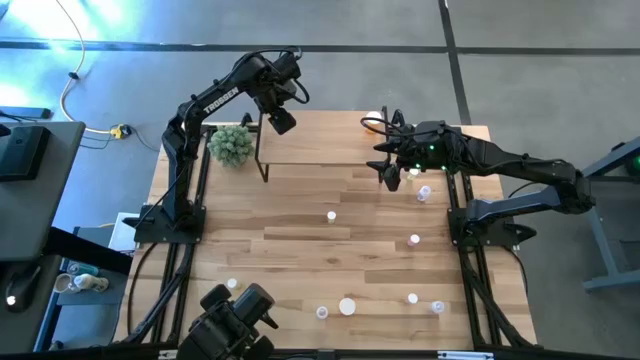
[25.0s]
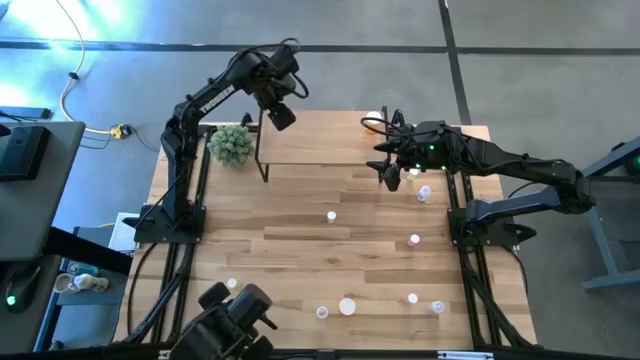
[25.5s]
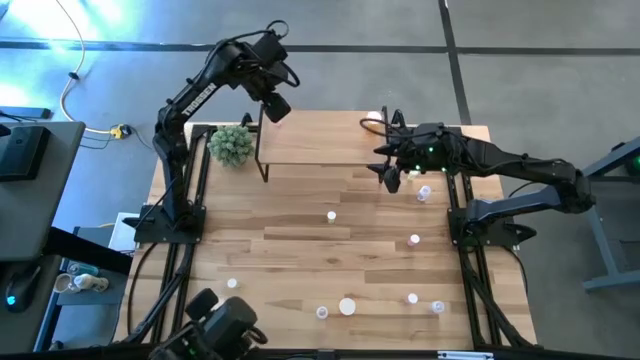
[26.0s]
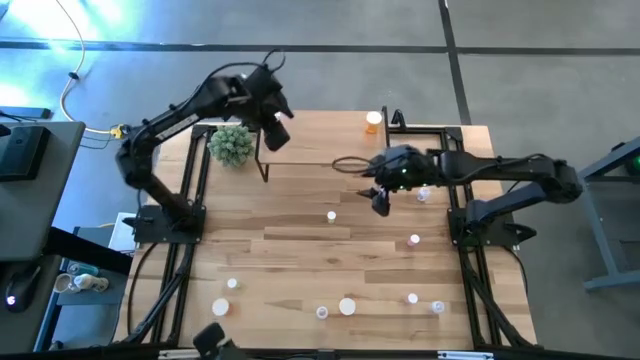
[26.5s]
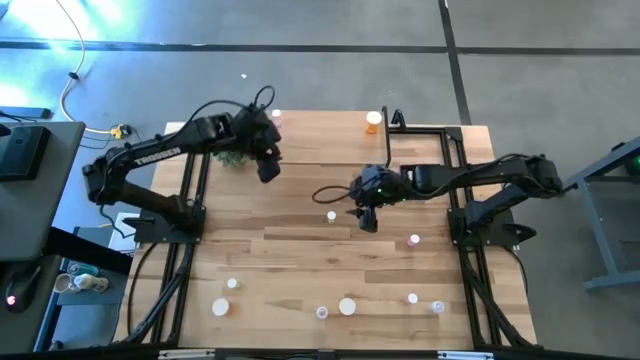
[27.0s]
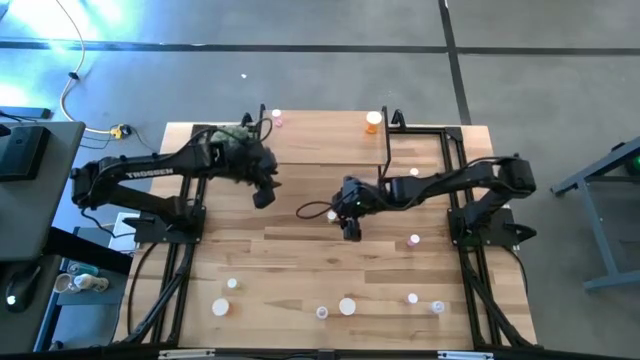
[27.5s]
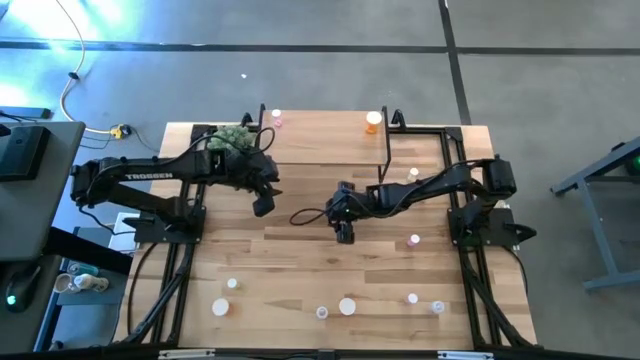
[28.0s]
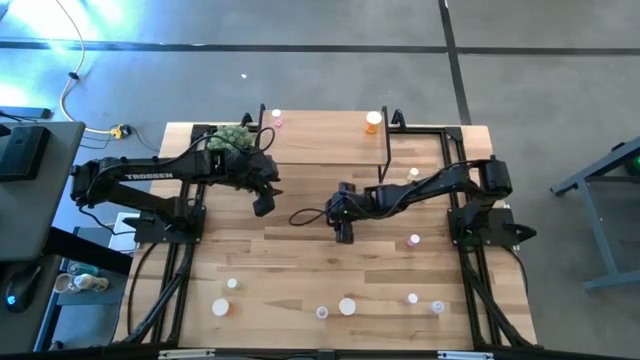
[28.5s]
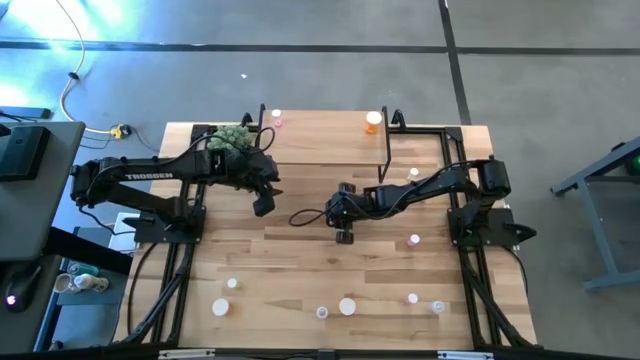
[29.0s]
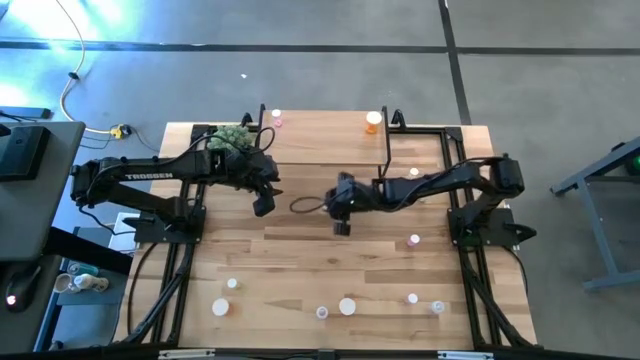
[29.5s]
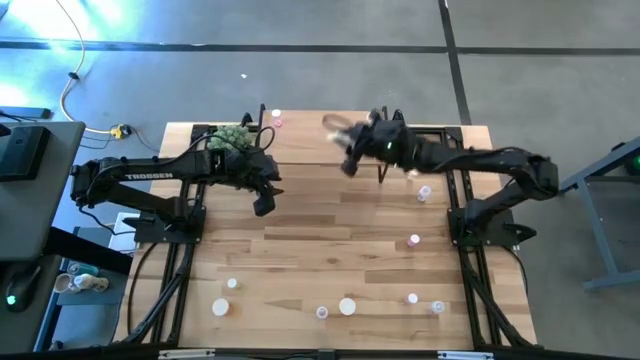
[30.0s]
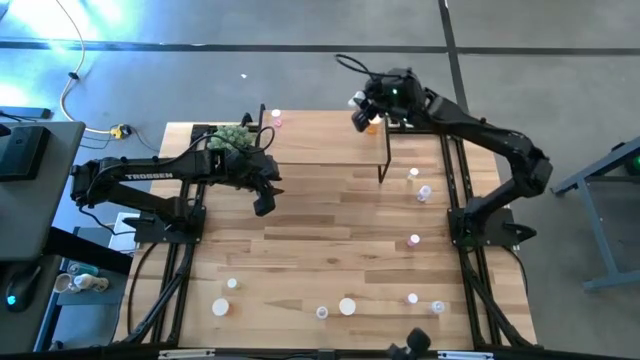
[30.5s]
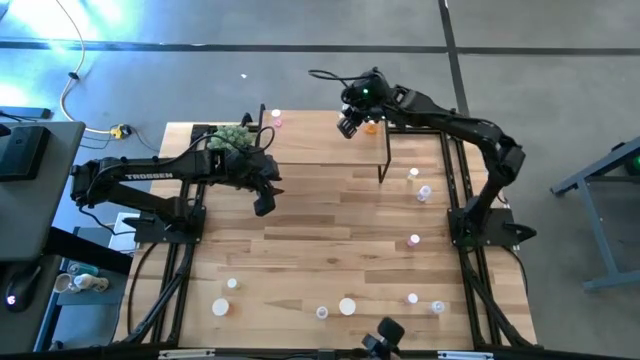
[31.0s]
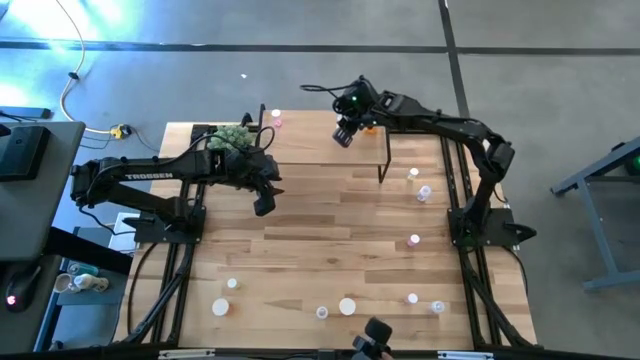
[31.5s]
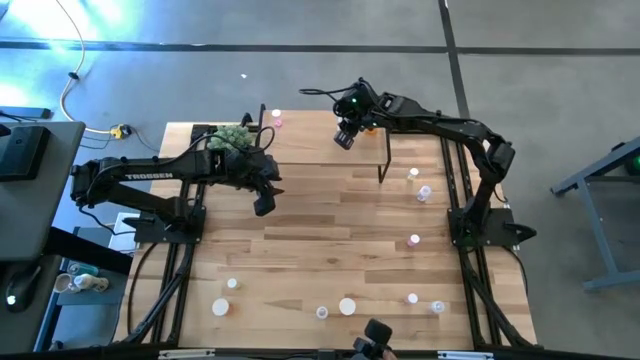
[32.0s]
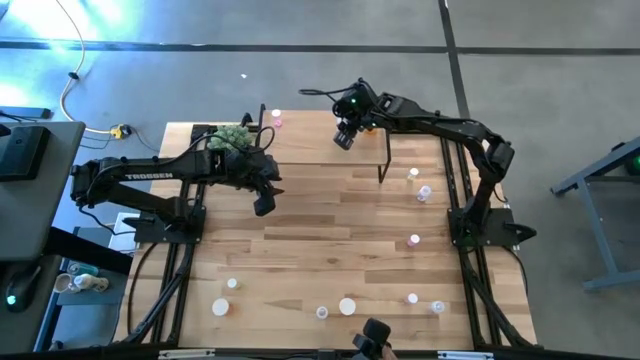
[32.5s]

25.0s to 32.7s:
Task: Pick and place medicine bottles onto shelf by color
Put the middle yellow pill bottle on the shelf

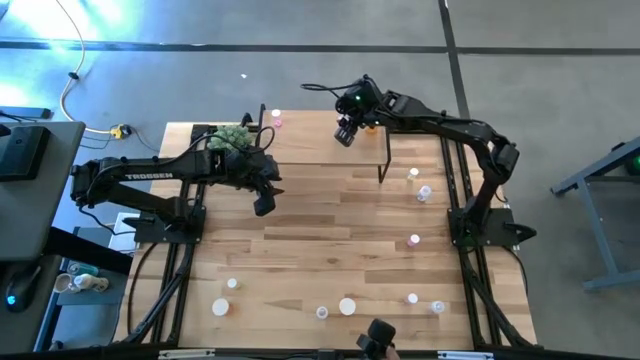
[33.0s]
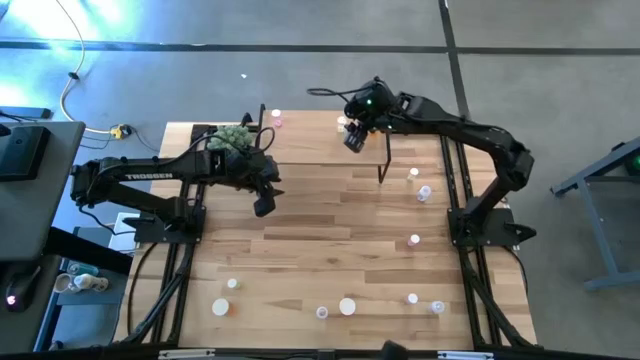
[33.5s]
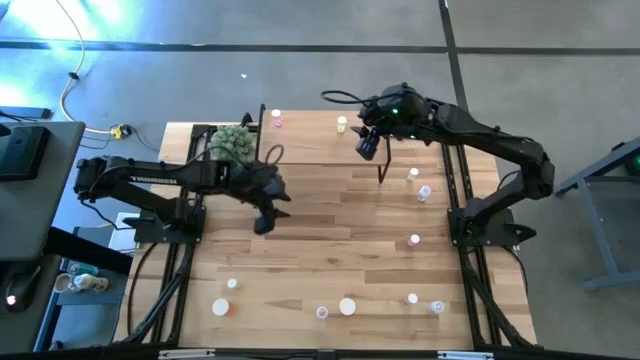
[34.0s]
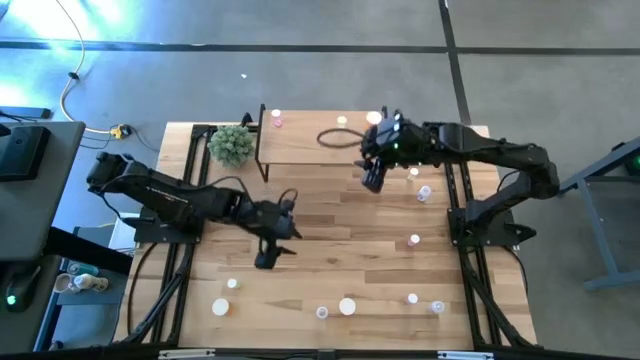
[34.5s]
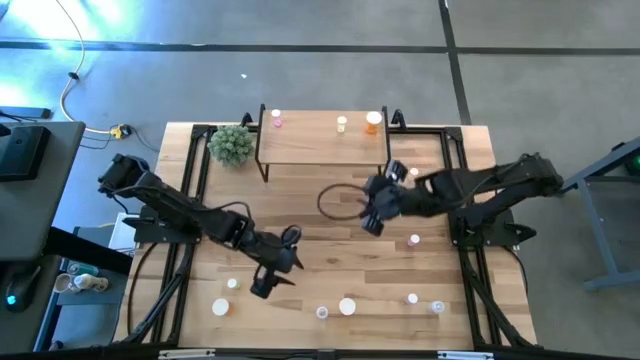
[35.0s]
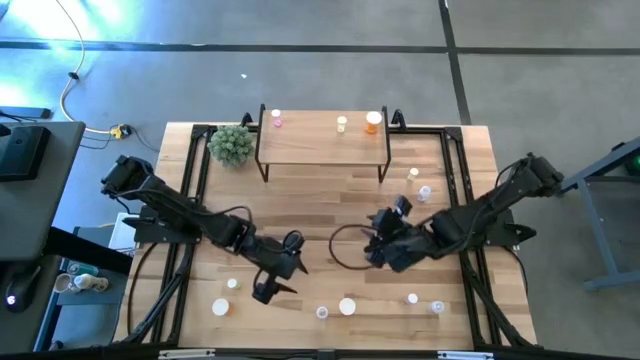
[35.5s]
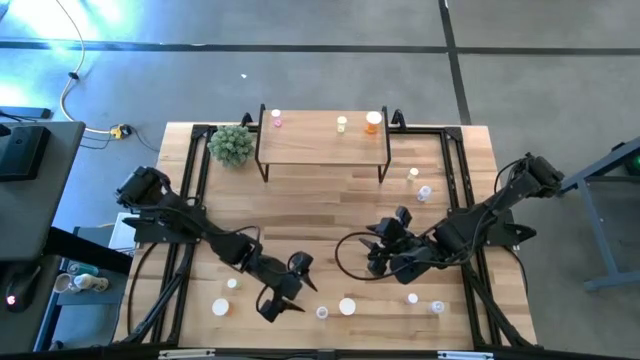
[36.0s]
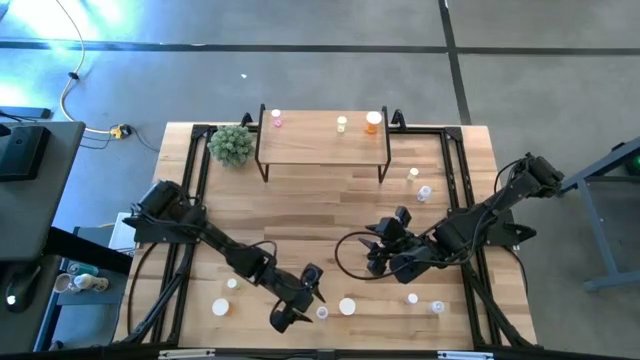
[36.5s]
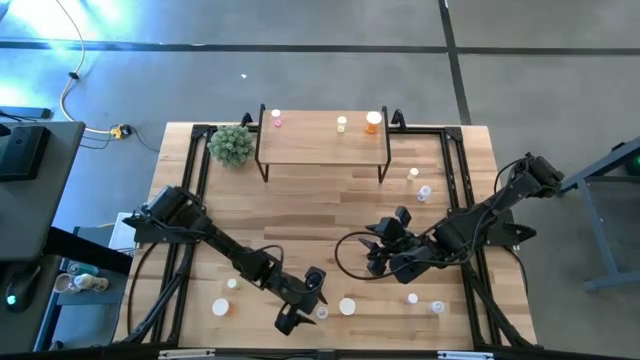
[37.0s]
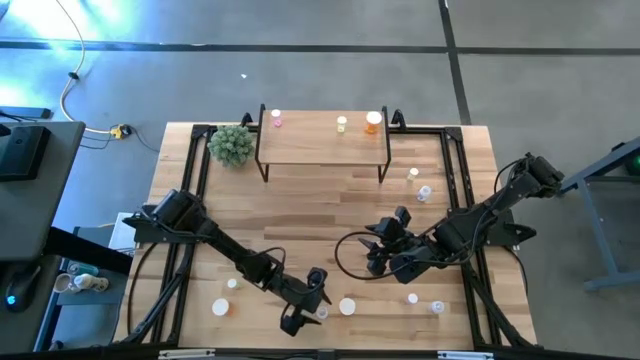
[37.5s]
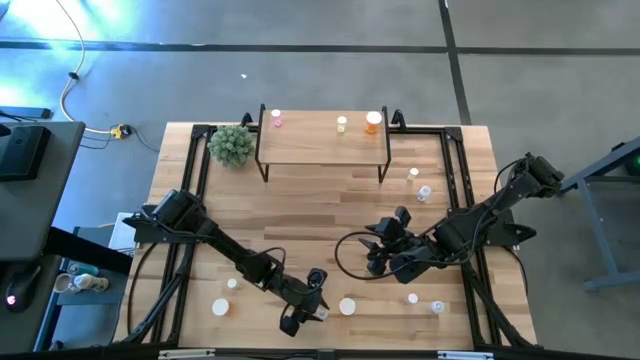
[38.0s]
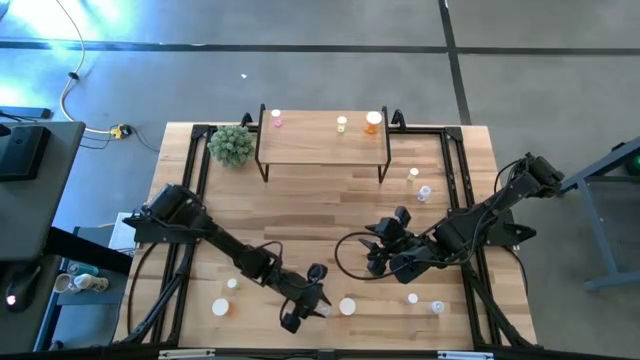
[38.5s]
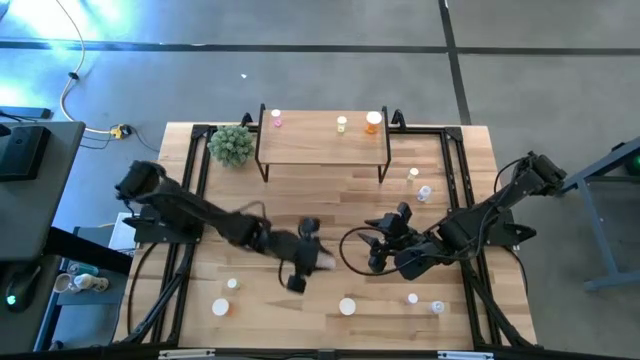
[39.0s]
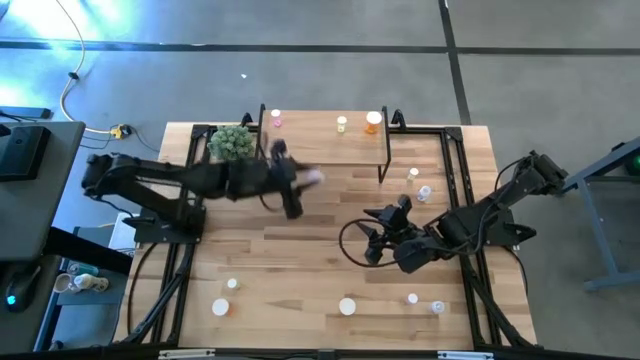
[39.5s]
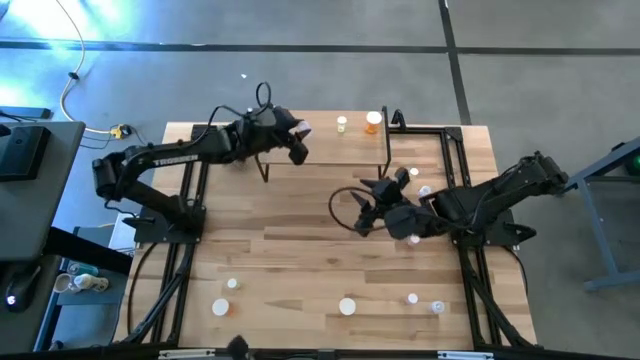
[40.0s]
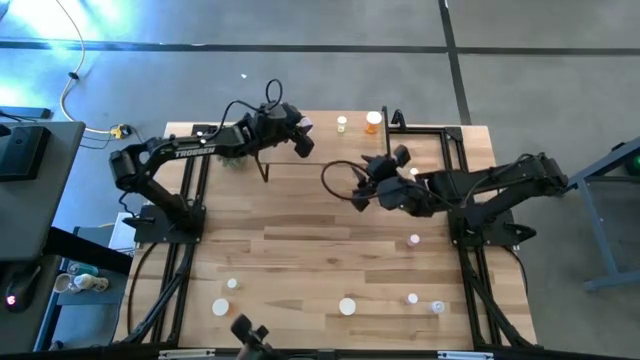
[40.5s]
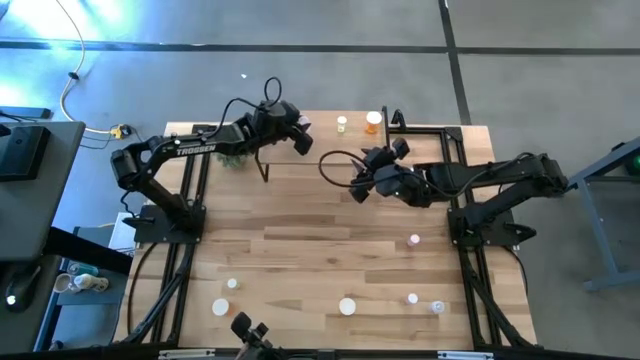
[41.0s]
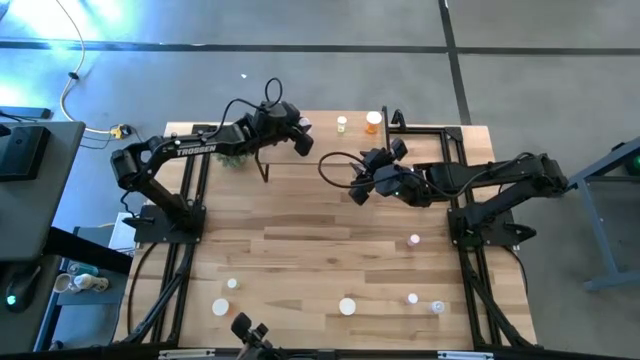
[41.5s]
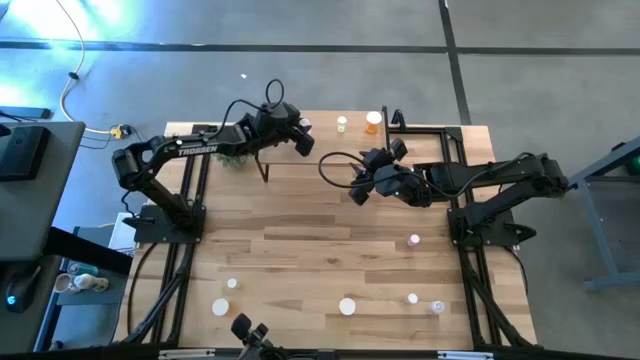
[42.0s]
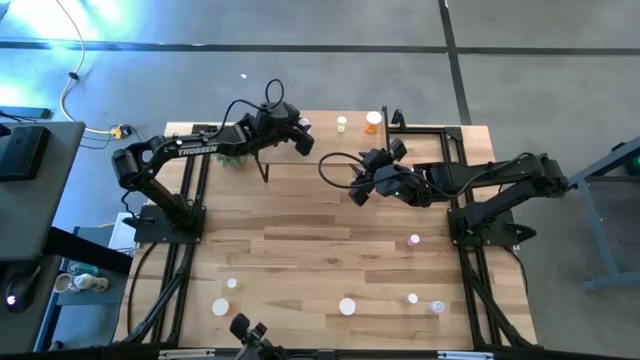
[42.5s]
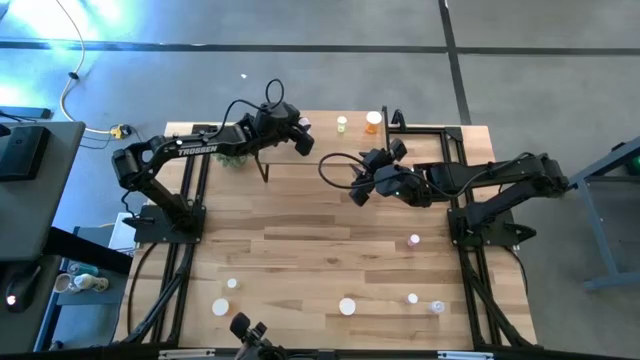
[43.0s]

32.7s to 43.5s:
Put the bottom left transparent pill bottle on the shelf

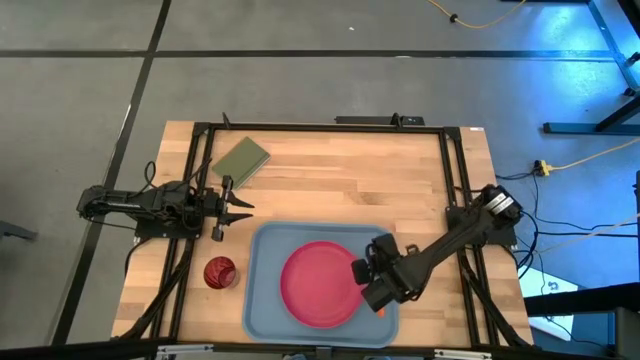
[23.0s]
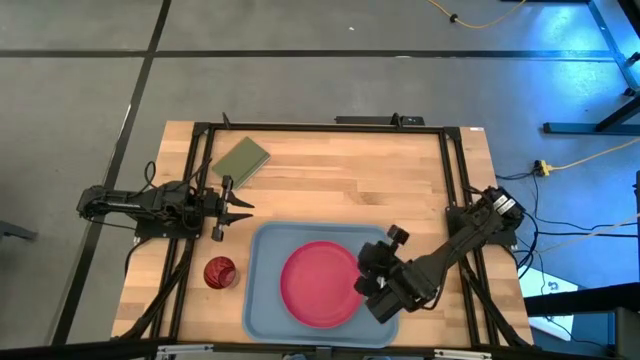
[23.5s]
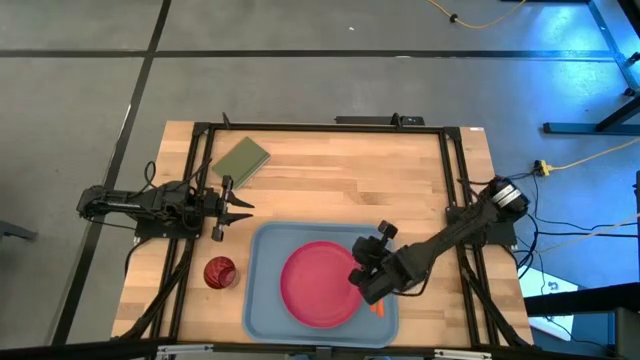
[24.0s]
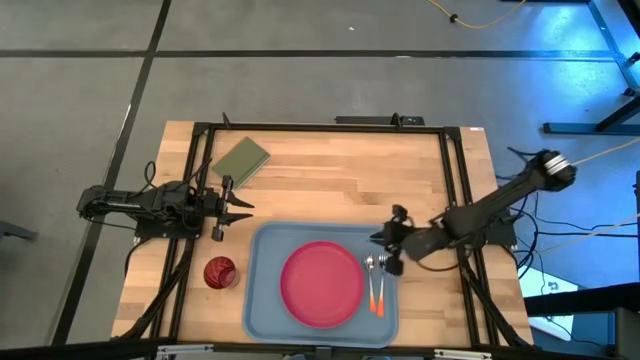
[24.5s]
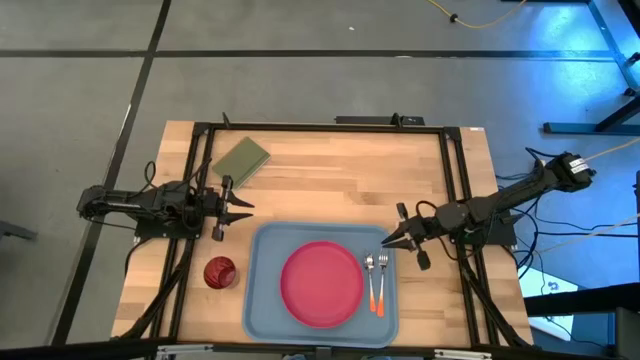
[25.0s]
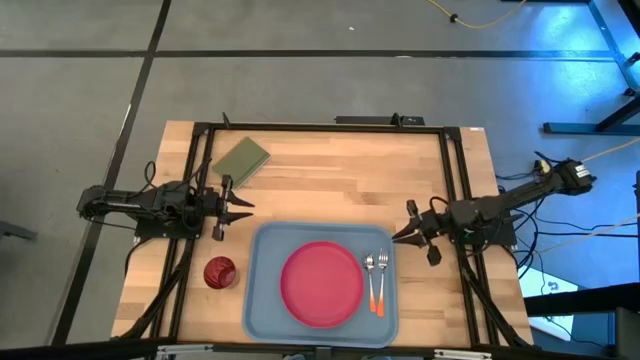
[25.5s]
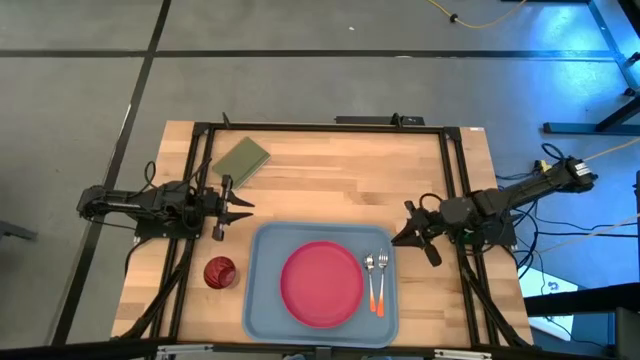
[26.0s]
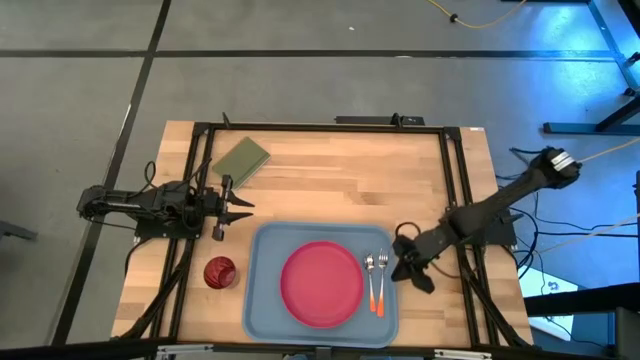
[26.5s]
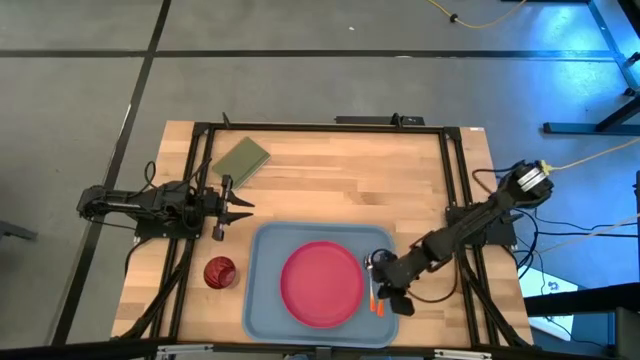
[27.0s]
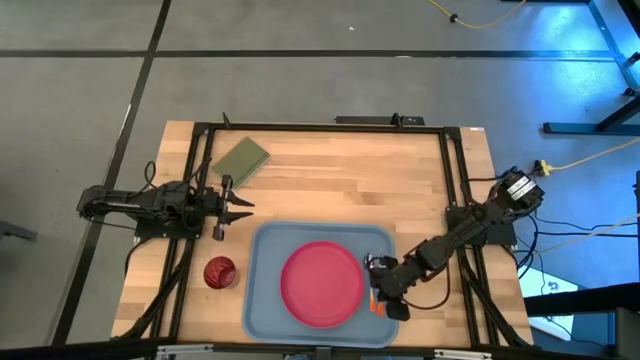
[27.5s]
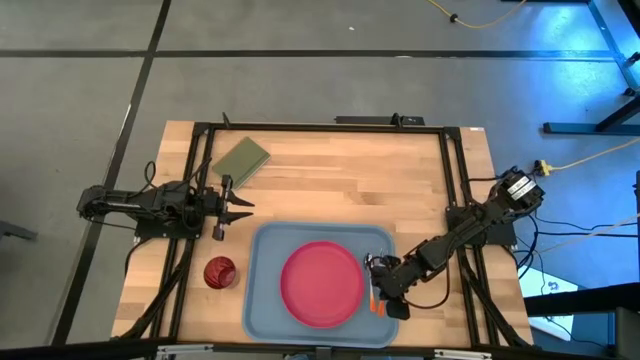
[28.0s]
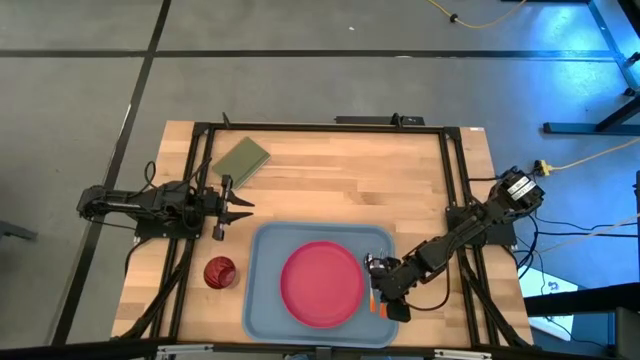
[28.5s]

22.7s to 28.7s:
Task: Pick and place plate/cup/fork/spoon on tray
Adjust the orange fork
